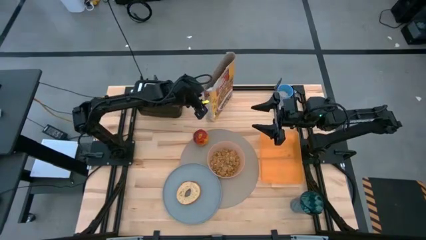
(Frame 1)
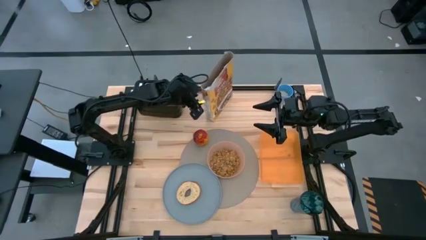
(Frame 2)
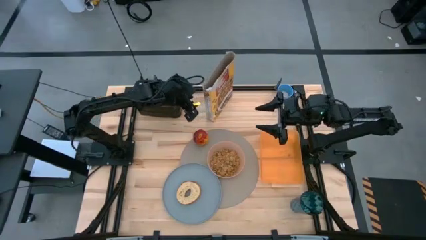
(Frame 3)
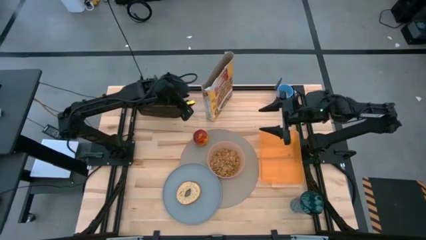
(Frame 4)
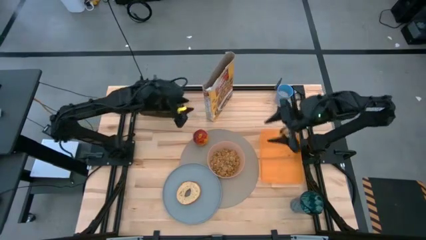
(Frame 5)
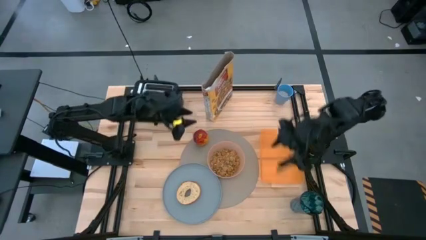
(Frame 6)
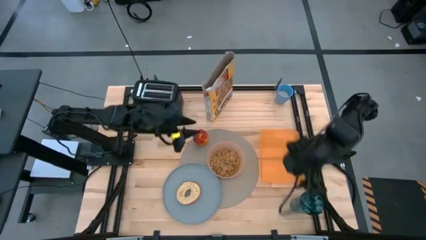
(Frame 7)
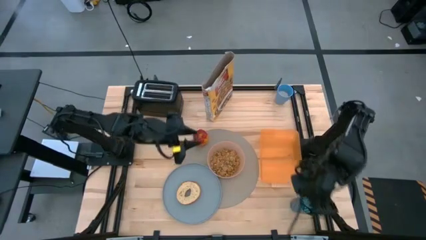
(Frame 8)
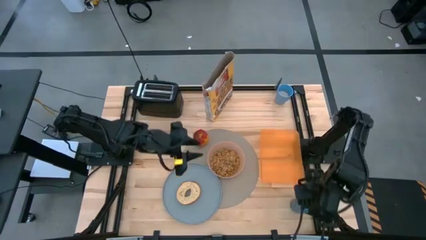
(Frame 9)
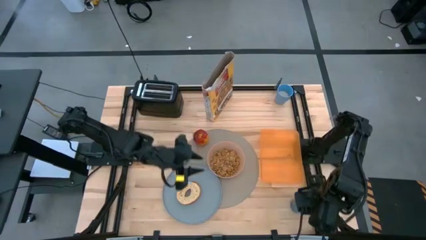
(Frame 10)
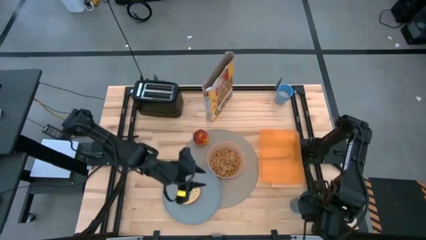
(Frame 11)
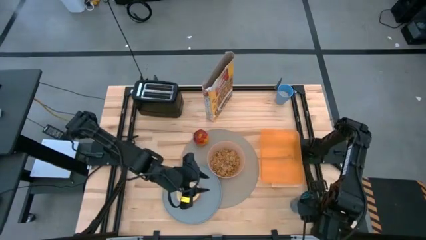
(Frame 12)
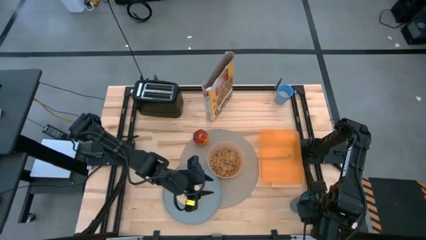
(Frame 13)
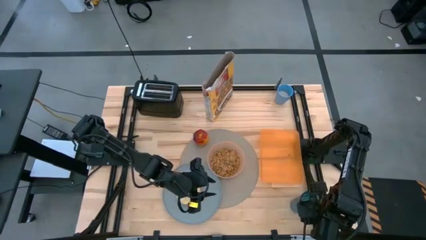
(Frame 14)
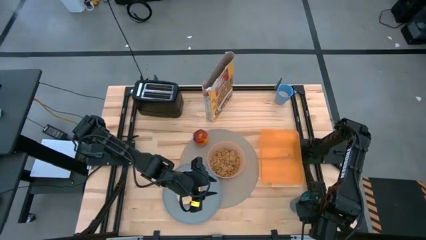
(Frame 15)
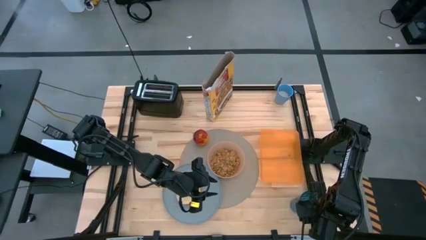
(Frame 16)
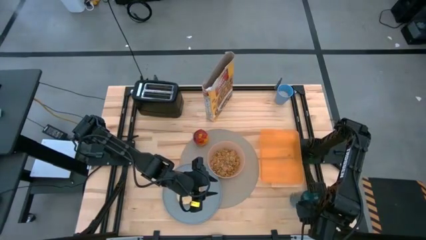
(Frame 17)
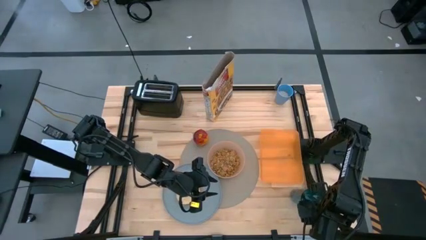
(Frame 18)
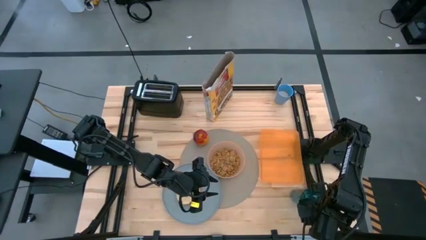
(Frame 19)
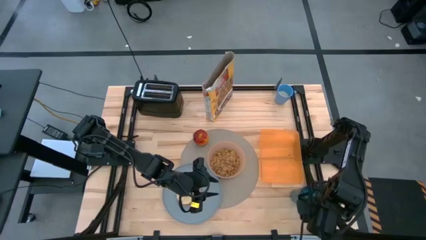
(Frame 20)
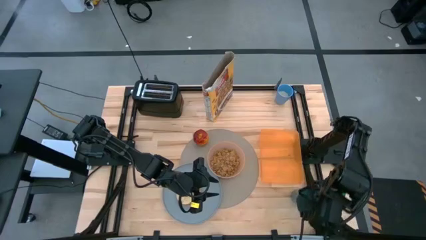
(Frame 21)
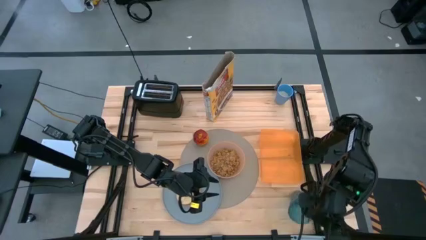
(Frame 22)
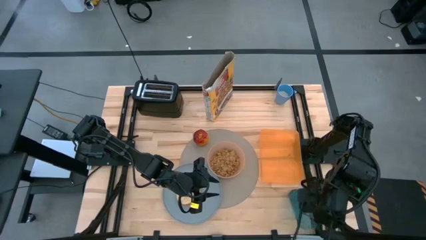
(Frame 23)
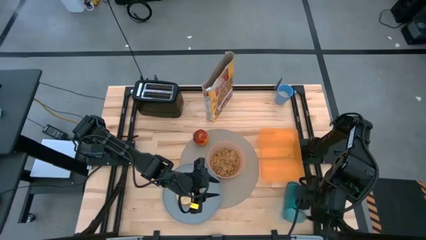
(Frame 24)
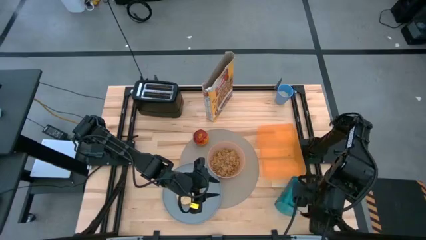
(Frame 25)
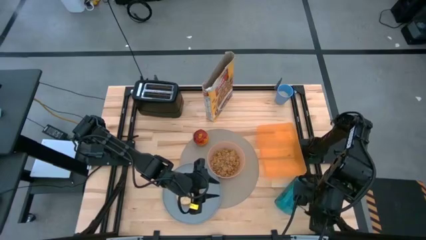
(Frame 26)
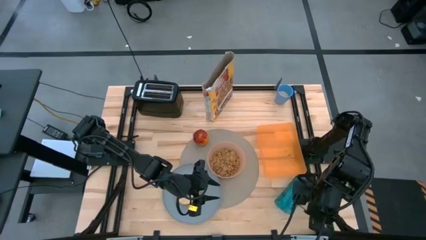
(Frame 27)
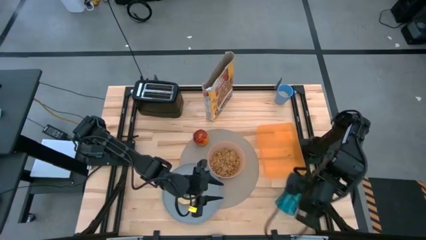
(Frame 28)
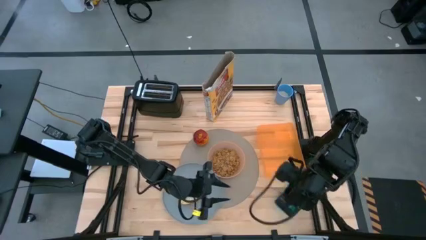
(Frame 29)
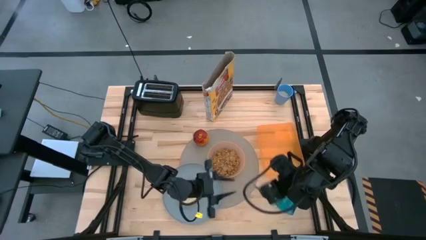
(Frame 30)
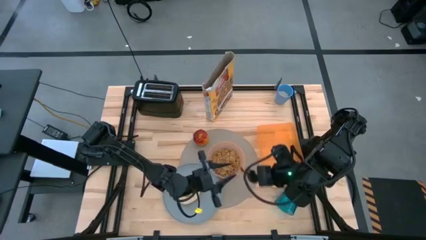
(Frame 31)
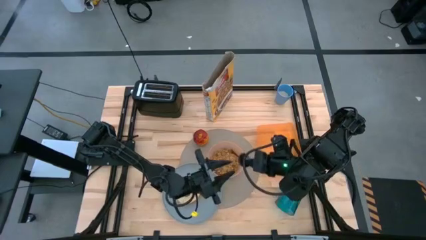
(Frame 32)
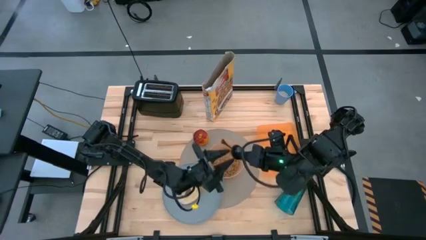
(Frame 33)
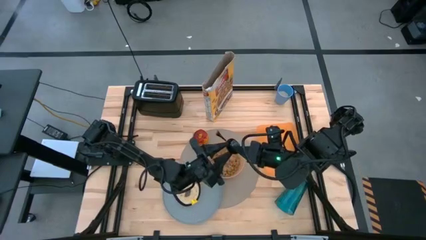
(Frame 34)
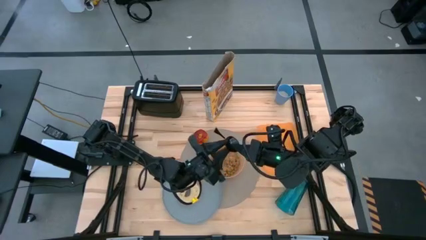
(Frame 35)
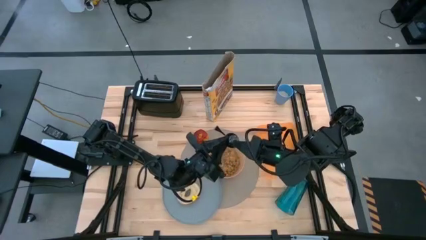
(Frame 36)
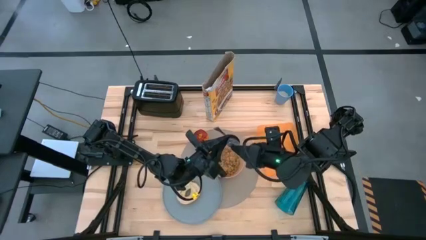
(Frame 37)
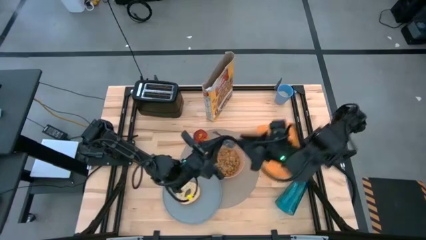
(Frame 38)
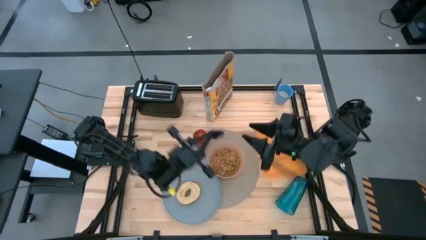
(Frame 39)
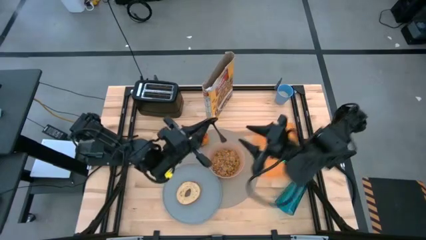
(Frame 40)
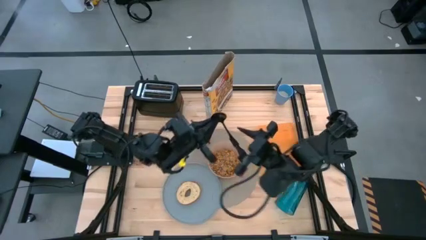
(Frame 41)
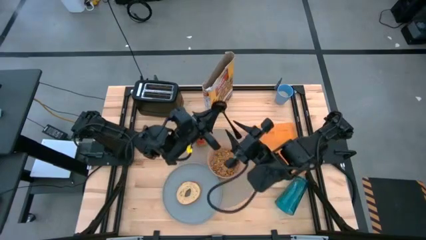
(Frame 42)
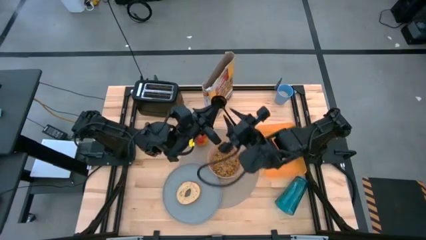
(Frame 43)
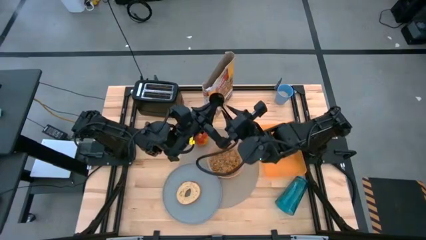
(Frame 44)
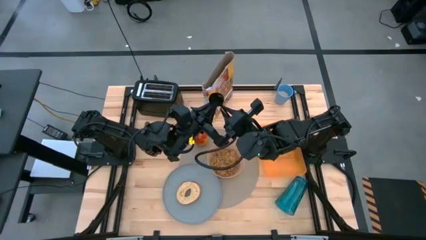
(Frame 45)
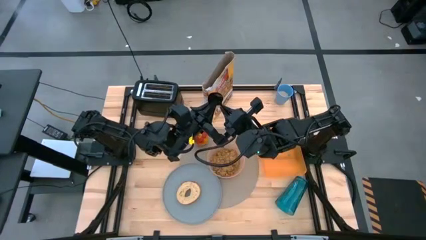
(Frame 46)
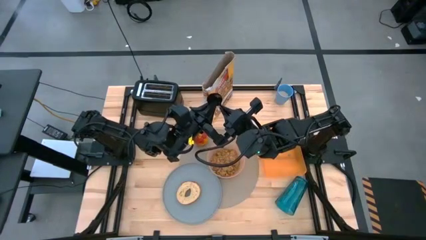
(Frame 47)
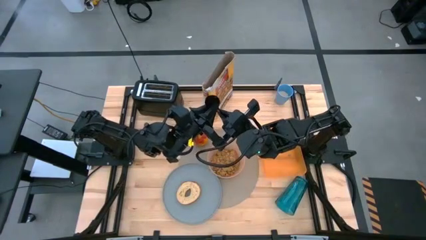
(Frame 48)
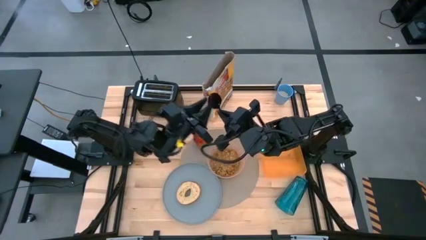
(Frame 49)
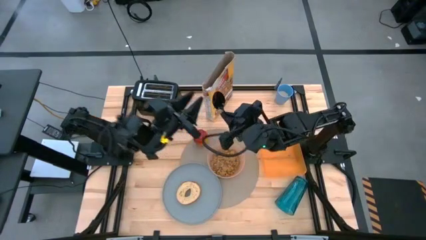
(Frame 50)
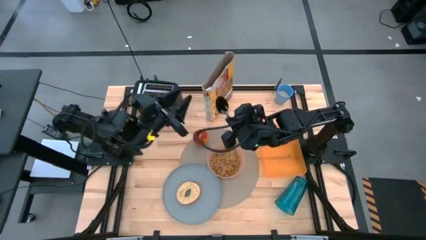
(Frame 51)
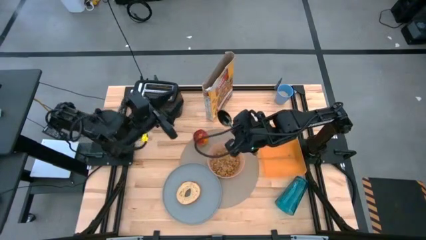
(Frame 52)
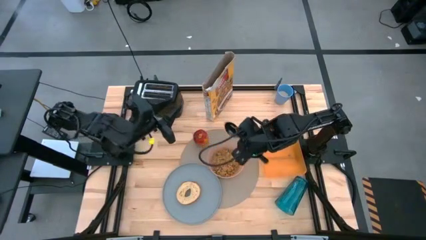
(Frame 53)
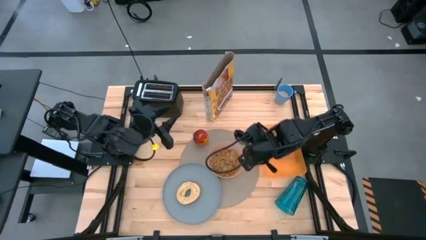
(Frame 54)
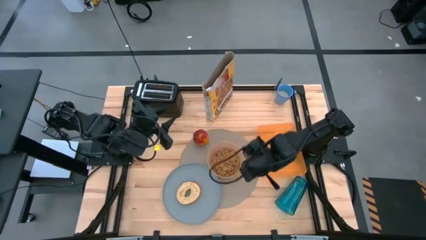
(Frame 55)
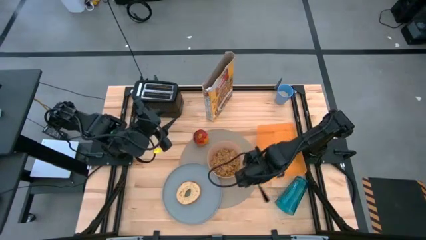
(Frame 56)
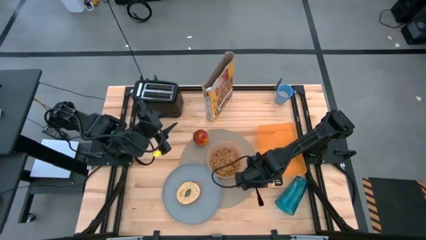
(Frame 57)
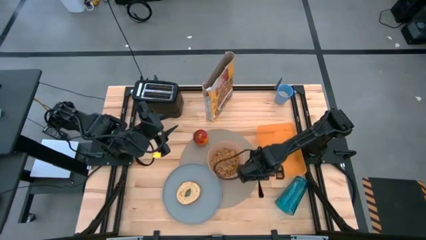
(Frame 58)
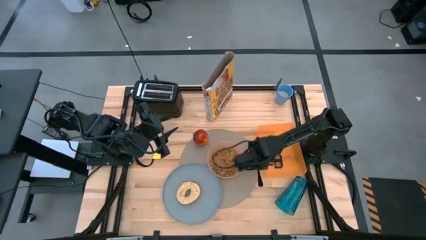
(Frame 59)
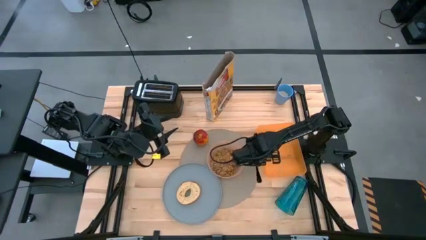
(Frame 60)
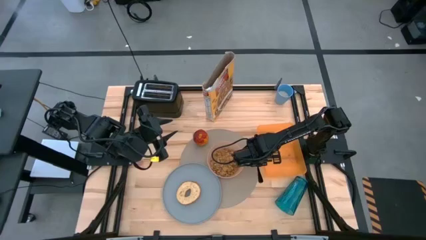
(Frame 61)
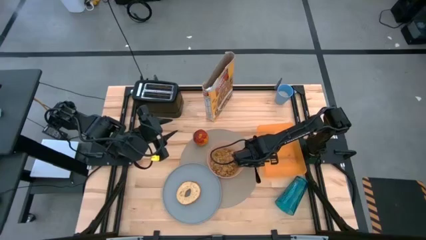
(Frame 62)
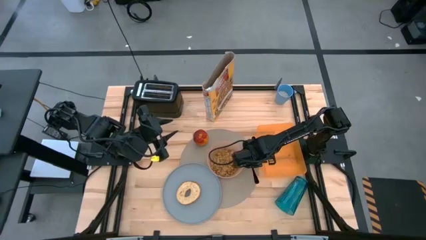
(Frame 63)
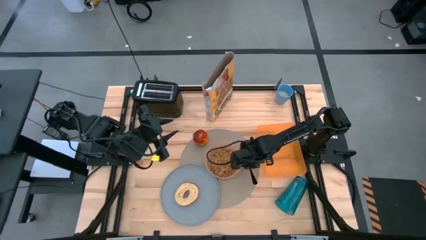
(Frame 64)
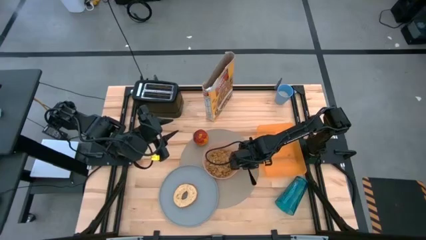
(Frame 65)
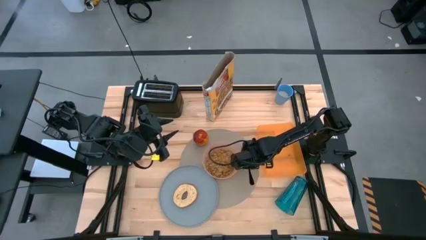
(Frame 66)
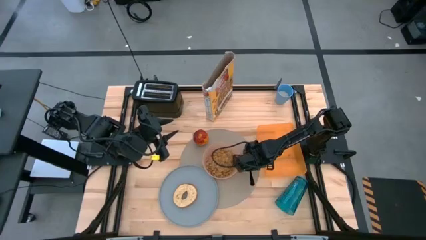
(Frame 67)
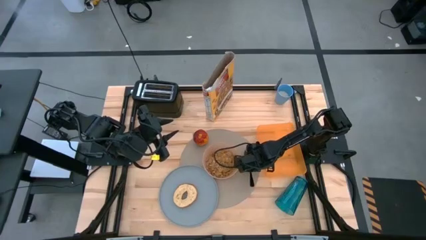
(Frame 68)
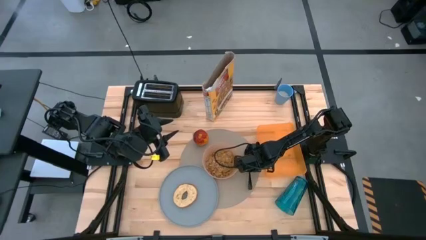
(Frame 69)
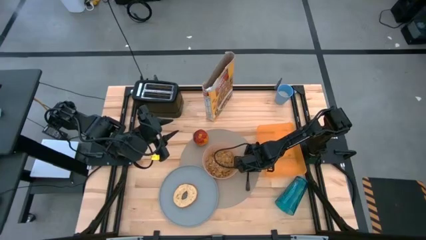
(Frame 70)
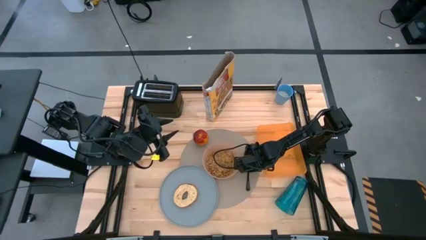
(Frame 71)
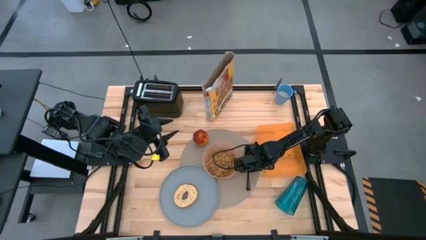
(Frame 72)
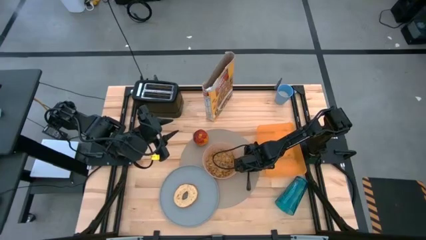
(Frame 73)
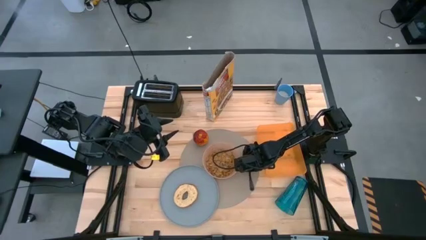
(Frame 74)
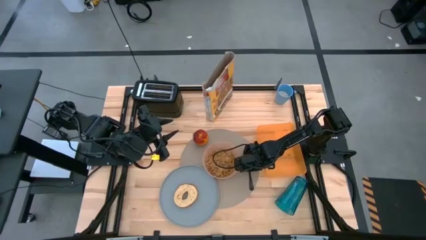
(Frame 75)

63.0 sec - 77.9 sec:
Task: Arrange a breakfast setting
Put the black spoon to the right of the light orange bowl on the gray mat

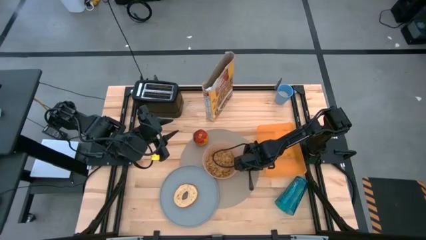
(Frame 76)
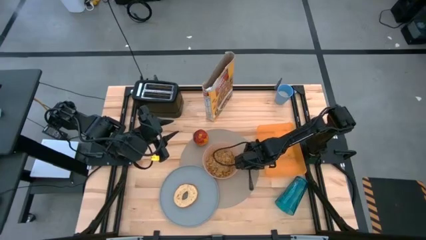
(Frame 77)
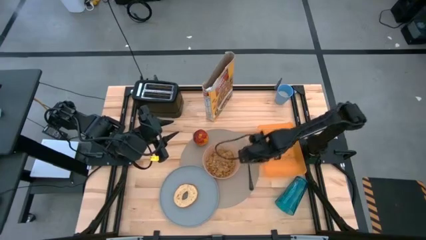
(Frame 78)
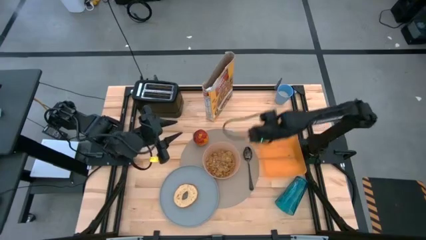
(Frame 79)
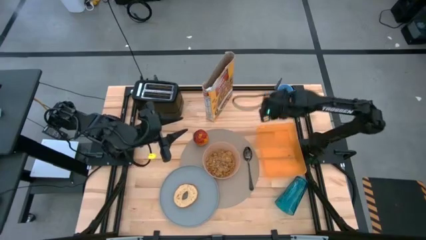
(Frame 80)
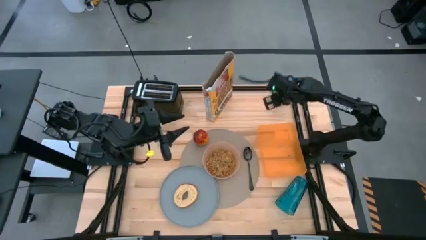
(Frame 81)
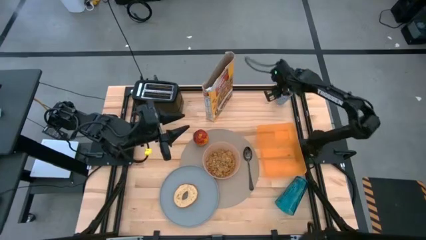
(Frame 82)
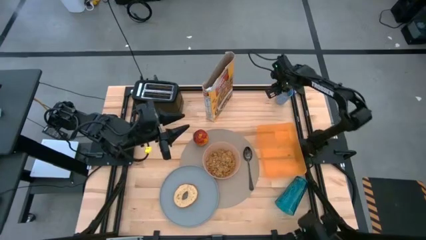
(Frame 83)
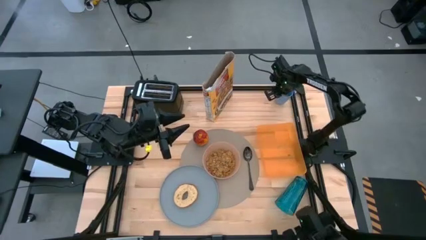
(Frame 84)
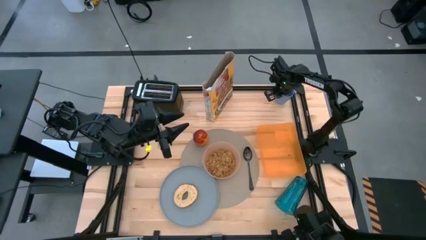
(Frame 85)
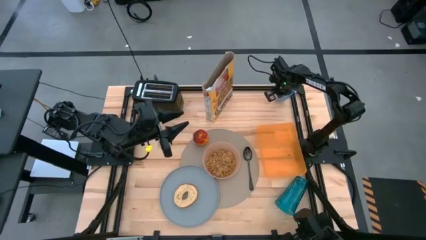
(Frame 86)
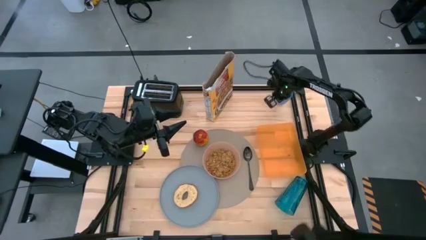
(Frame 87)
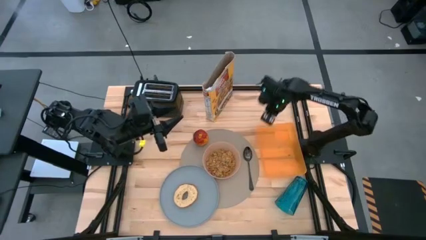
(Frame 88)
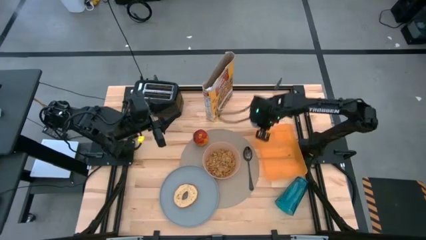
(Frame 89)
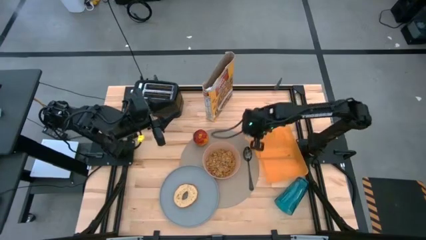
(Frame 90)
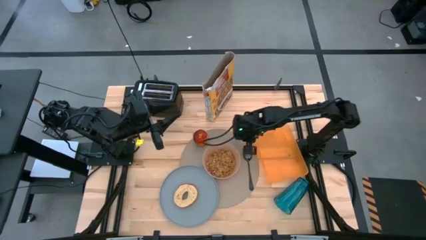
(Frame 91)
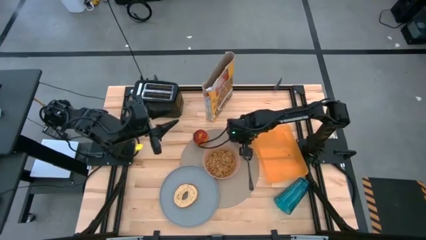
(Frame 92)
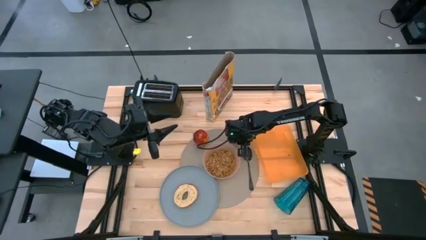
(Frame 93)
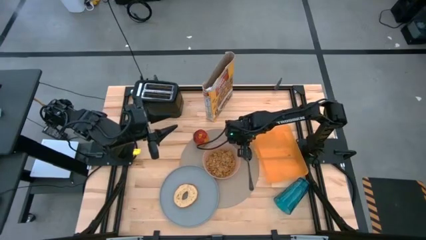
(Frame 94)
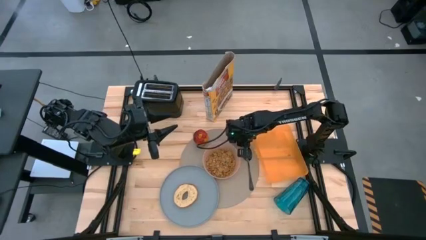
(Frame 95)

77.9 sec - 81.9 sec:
Put the blue cup to the top right of the light orange bowl on the gray mat
